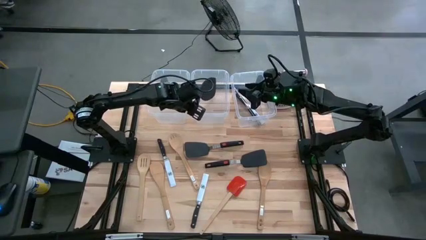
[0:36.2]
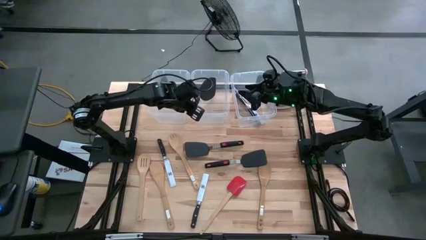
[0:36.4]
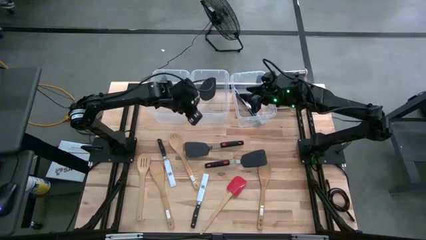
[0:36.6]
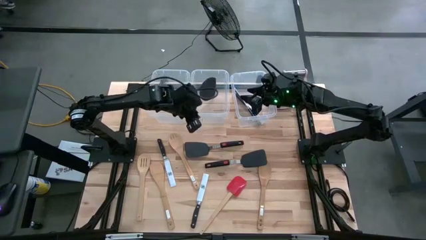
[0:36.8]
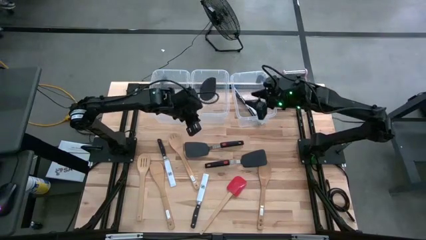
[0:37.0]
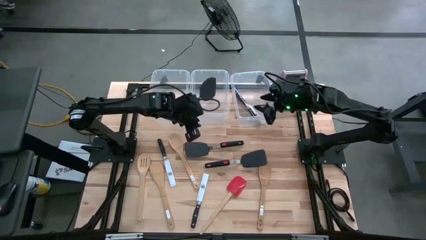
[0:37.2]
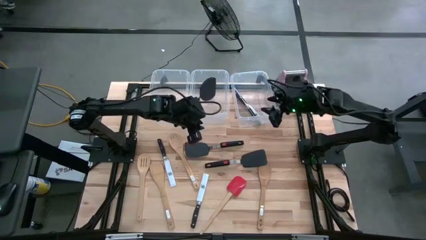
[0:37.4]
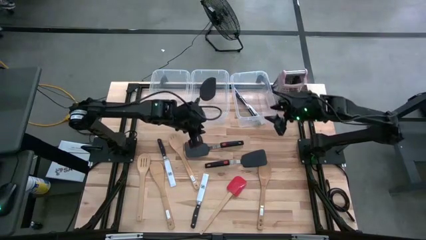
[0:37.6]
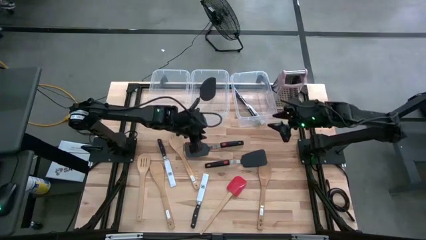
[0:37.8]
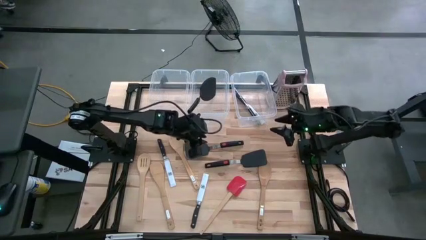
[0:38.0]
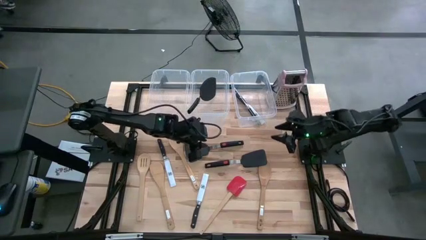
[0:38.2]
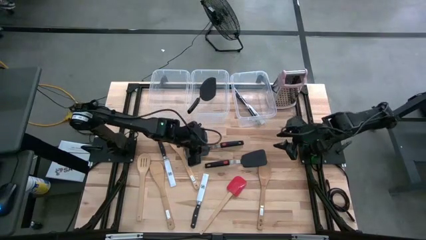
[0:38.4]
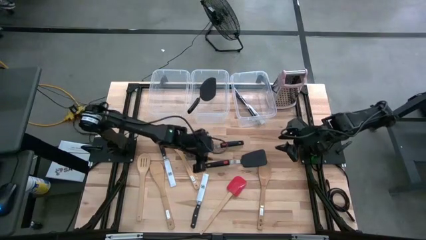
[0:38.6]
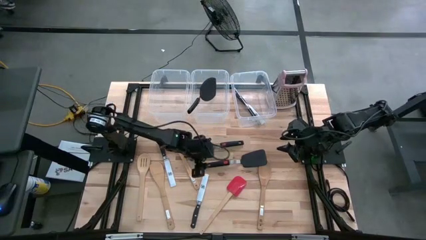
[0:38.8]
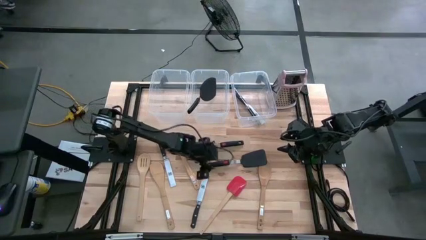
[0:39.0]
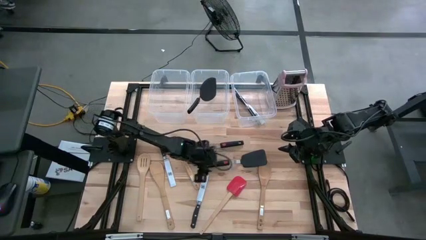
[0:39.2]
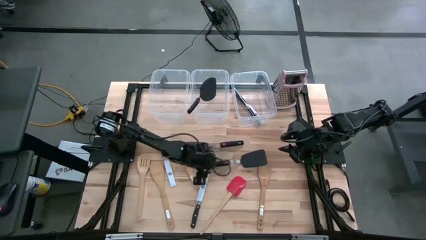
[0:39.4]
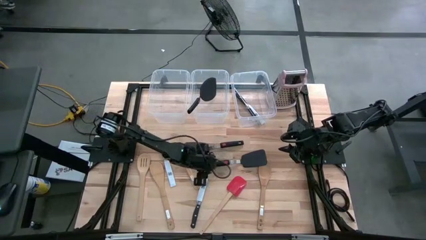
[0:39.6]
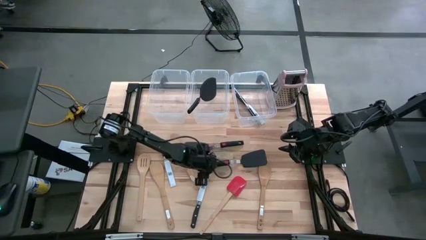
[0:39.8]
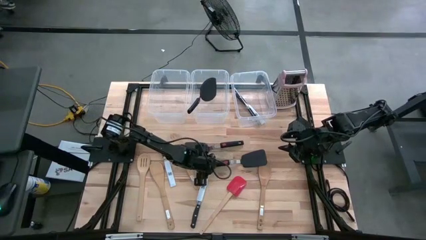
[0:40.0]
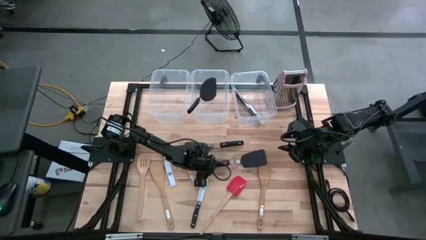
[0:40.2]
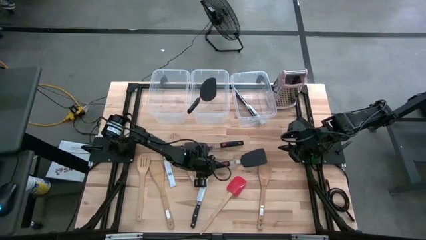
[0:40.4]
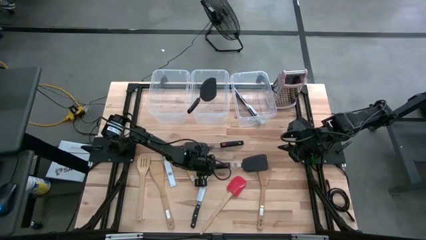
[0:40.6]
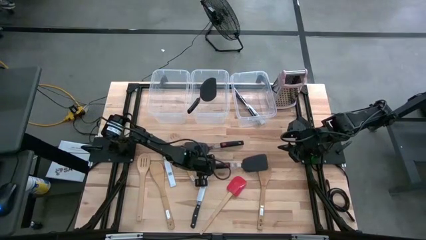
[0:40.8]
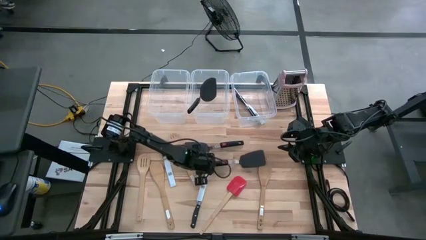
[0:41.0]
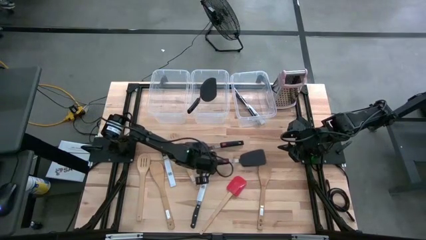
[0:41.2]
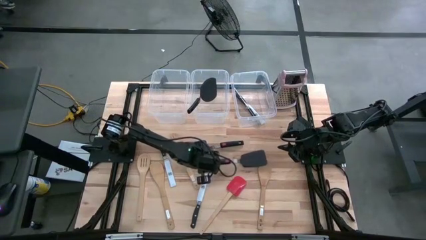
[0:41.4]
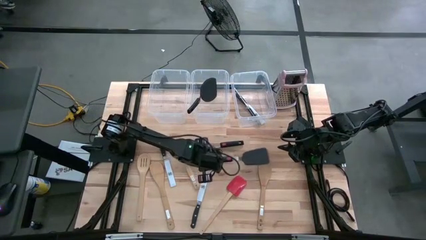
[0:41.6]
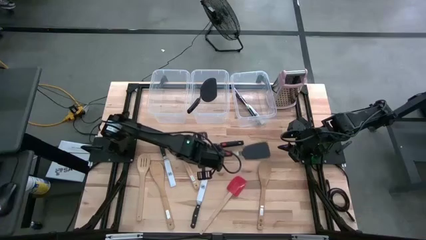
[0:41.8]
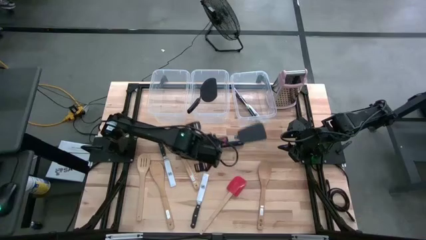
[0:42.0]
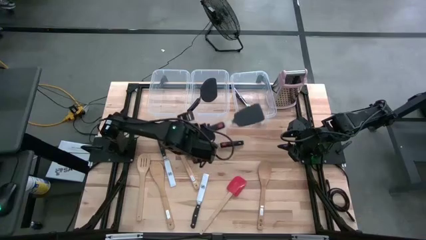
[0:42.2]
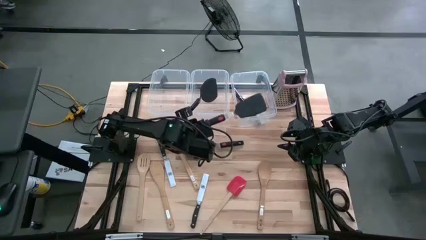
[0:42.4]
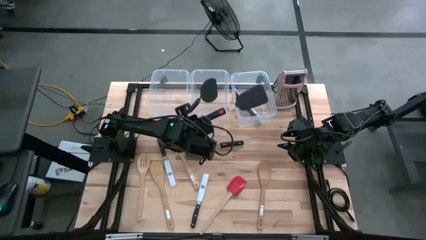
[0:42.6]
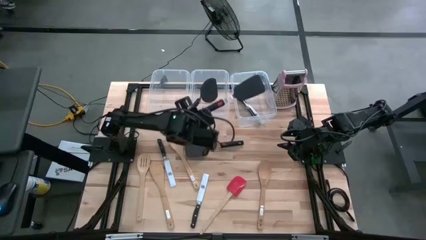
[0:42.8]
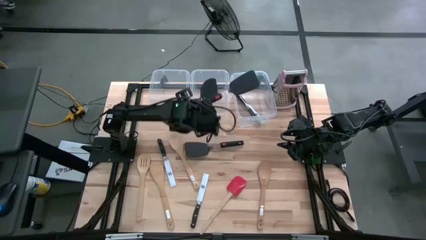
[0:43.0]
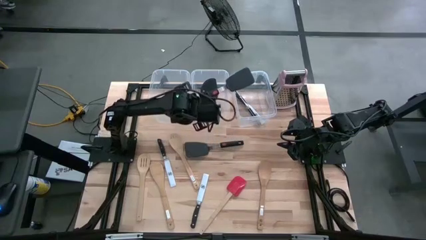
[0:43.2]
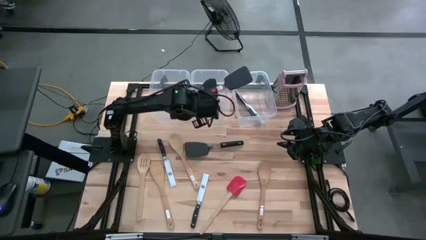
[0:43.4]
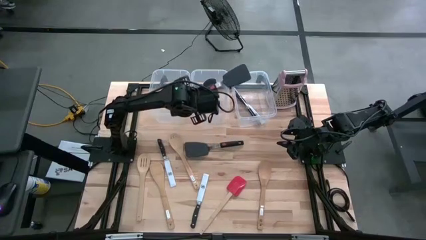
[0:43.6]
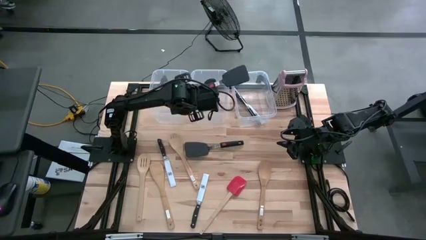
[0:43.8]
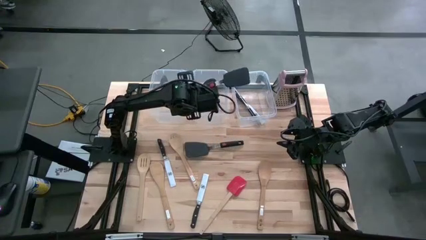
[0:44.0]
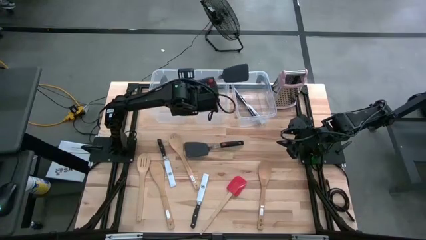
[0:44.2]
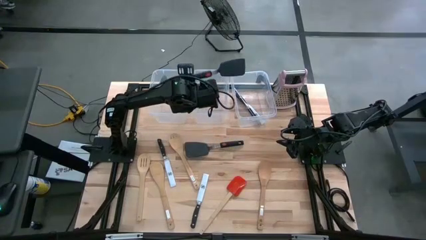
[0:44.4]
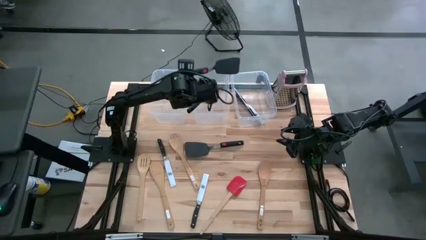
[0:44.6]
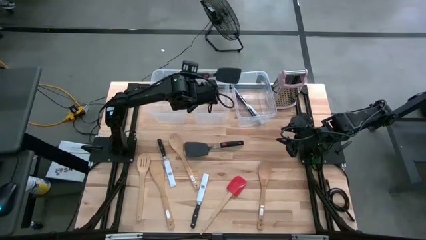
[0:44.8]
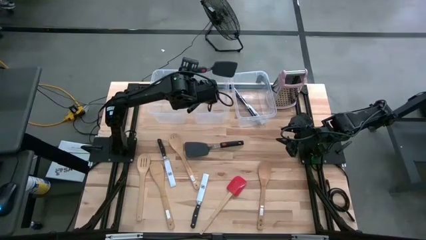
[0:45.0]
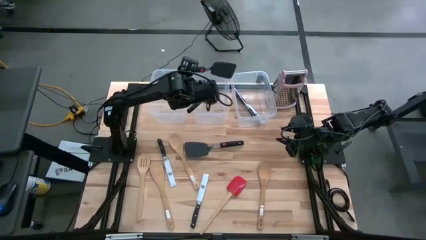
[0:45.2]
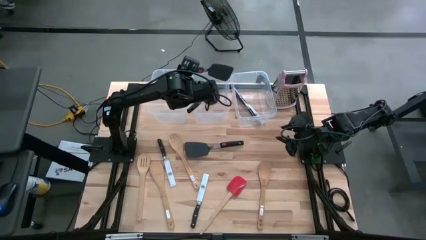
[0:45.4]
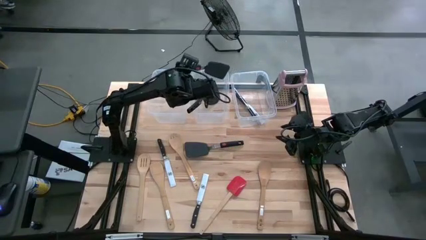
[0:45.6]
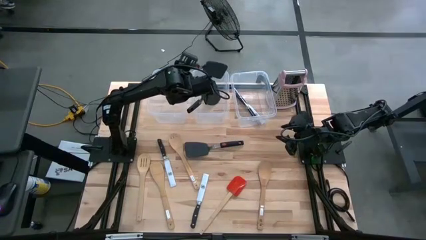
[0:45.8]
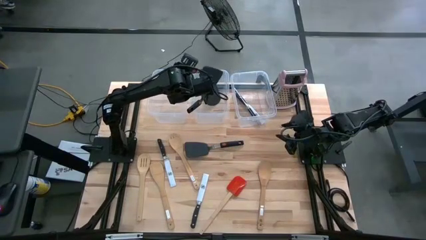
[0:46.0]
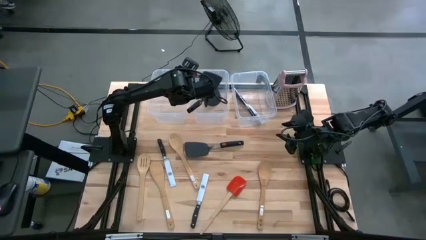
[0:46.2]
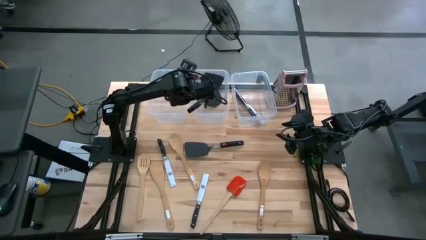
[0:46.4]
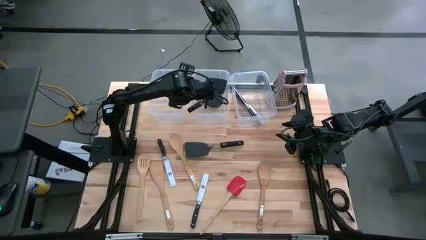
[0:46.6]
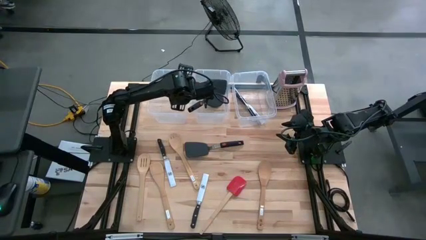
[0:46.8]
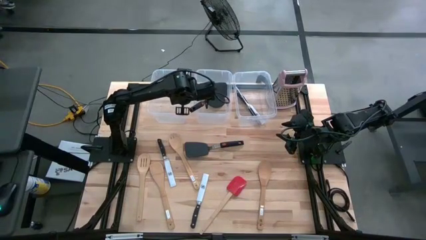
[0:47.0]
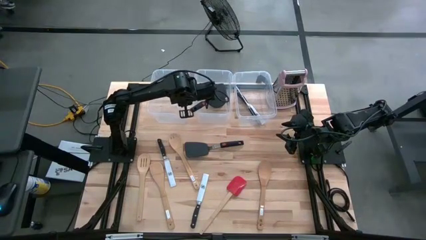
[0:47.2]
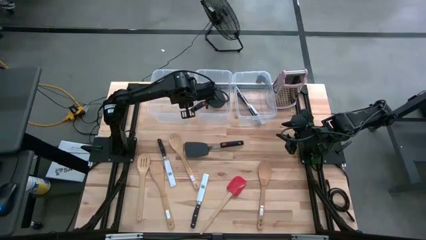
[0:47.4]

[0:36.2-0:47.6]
Task: Pick & Place Kitchen Items
Put the black spatula into the transparent middle bin
